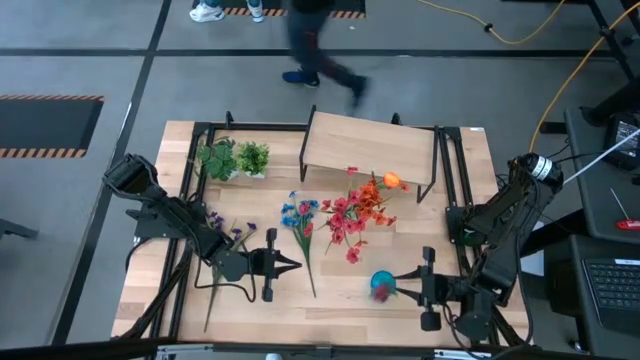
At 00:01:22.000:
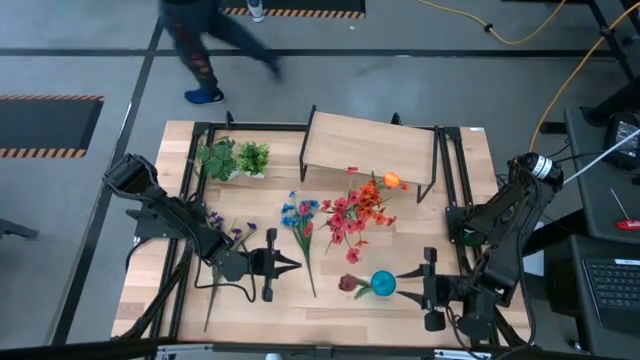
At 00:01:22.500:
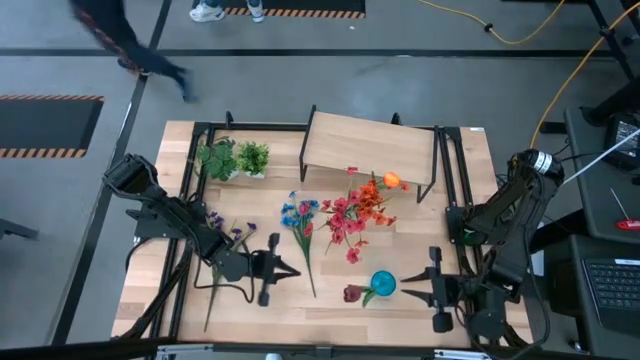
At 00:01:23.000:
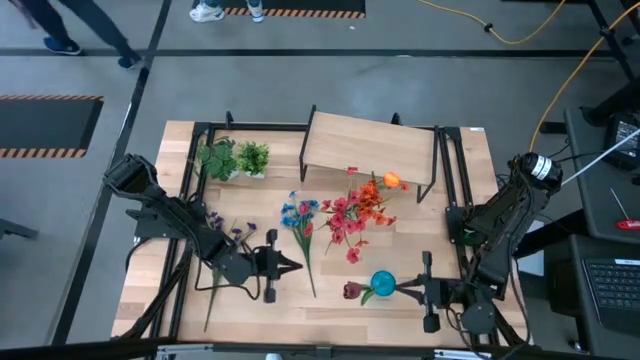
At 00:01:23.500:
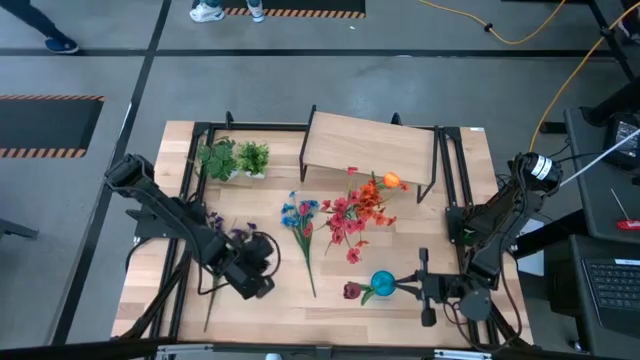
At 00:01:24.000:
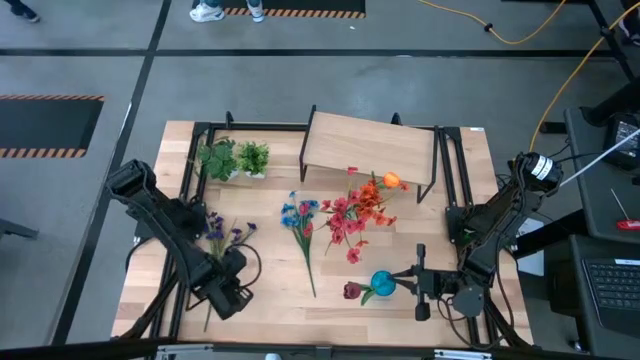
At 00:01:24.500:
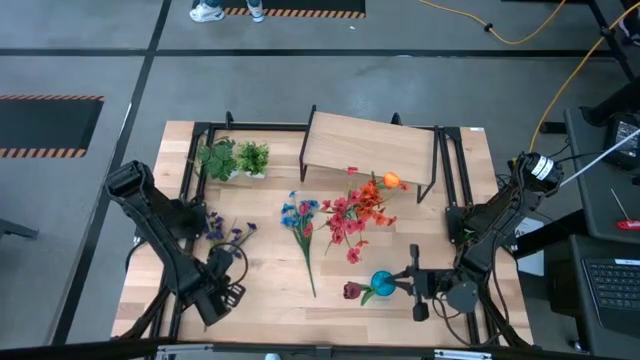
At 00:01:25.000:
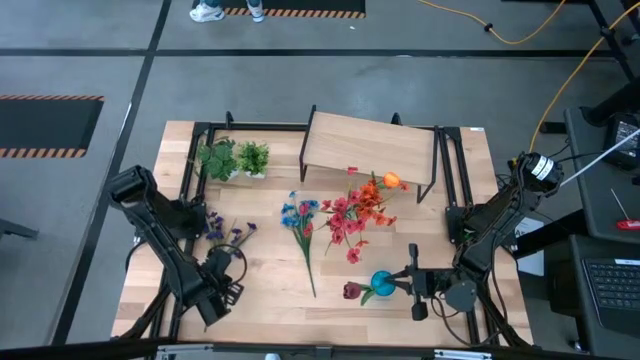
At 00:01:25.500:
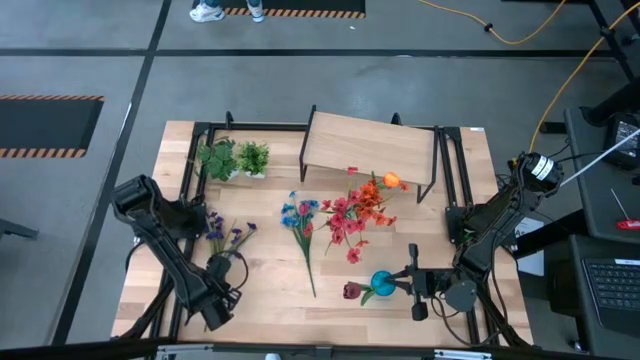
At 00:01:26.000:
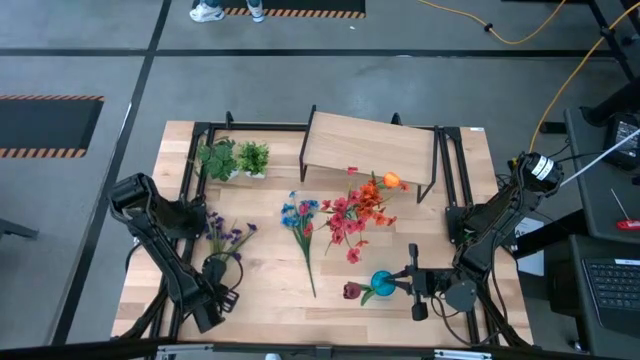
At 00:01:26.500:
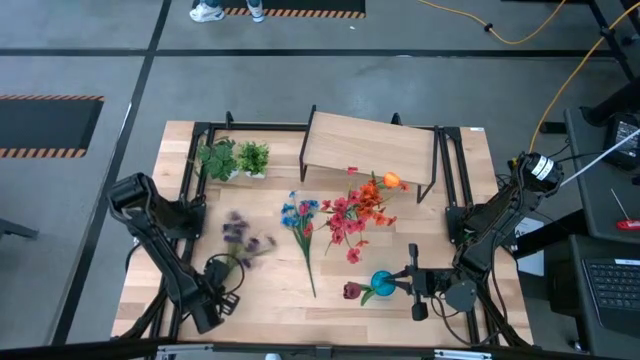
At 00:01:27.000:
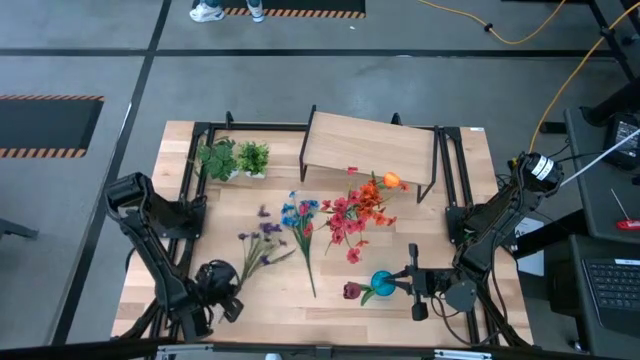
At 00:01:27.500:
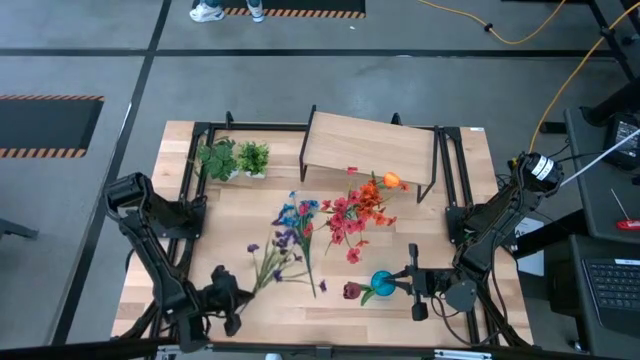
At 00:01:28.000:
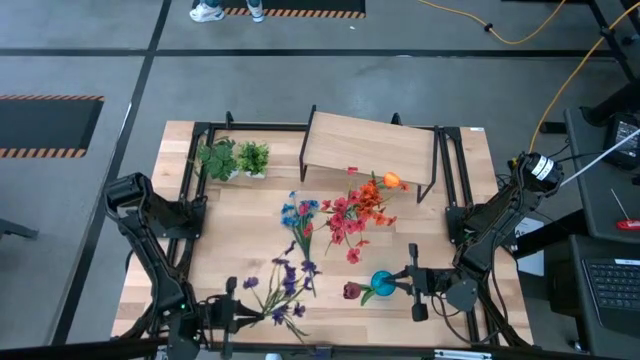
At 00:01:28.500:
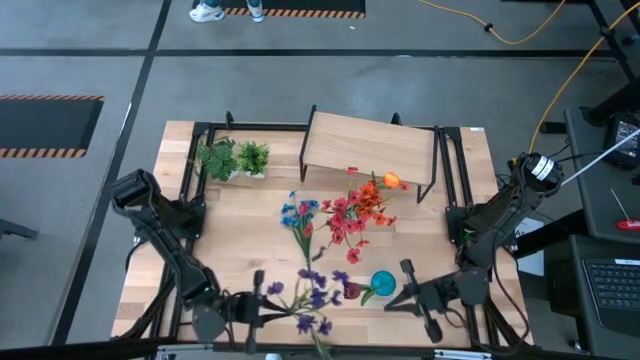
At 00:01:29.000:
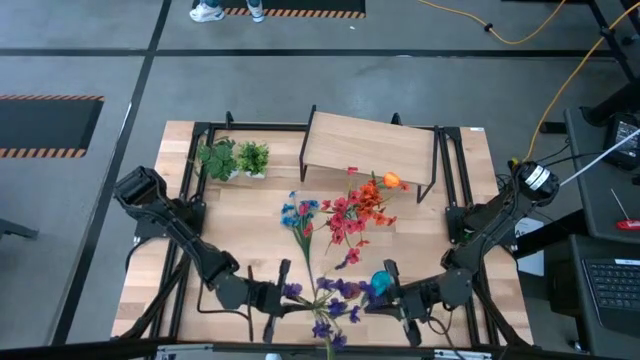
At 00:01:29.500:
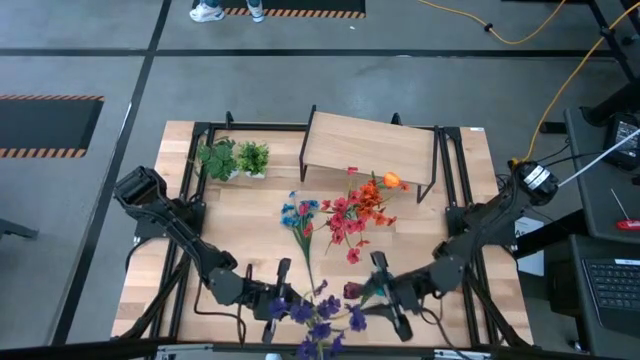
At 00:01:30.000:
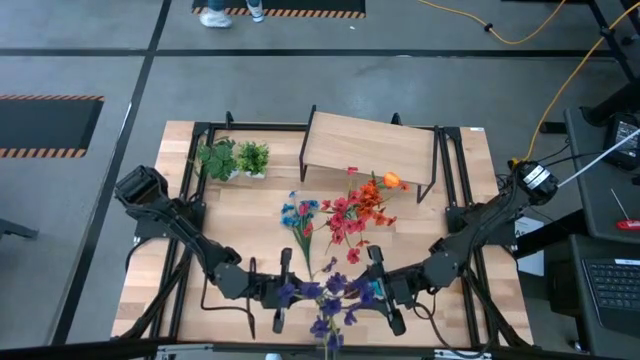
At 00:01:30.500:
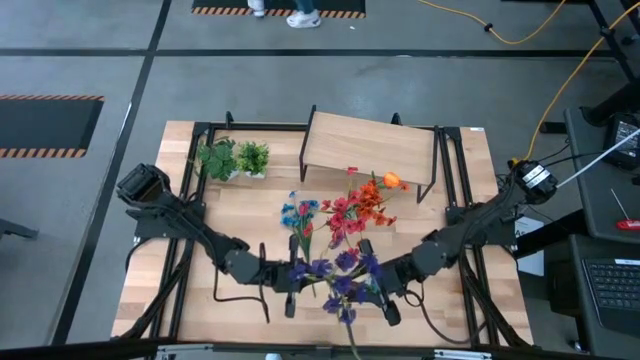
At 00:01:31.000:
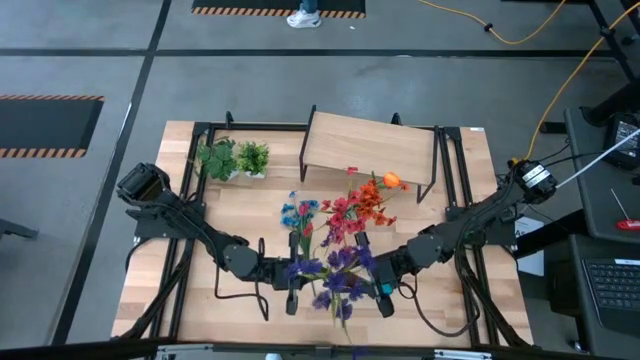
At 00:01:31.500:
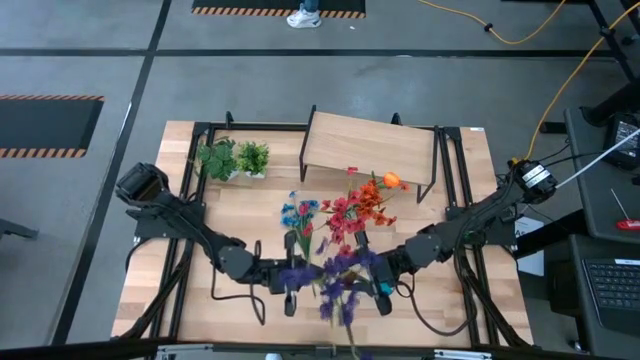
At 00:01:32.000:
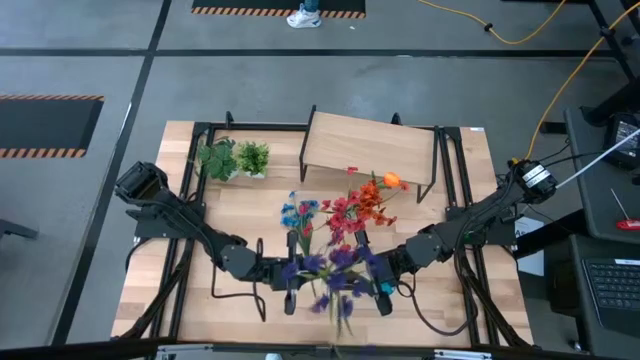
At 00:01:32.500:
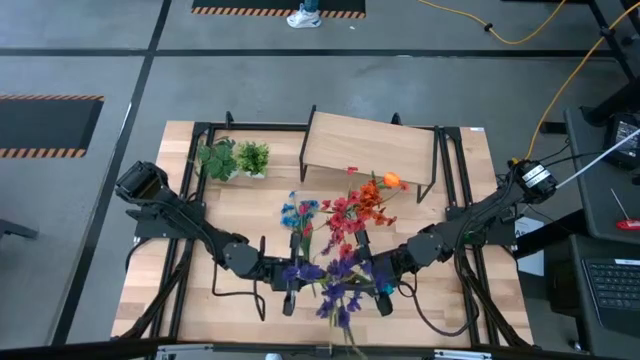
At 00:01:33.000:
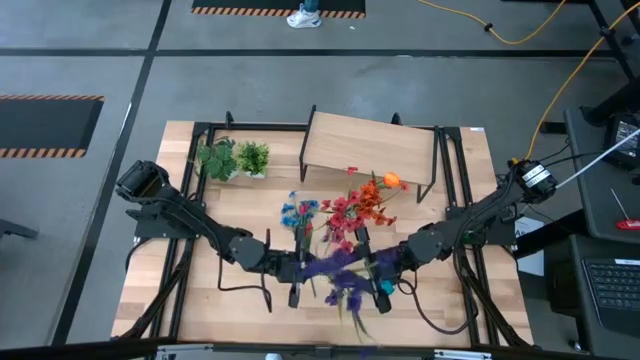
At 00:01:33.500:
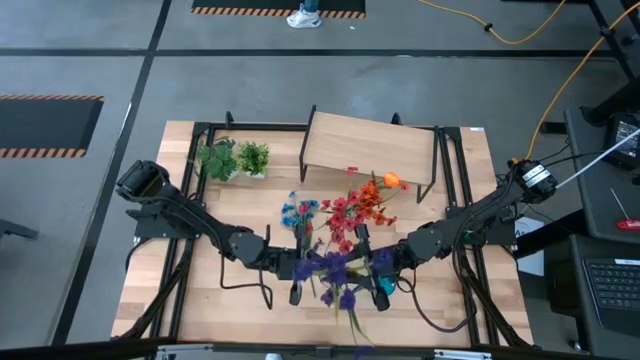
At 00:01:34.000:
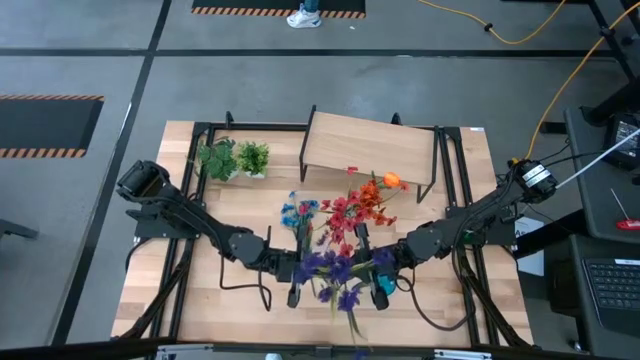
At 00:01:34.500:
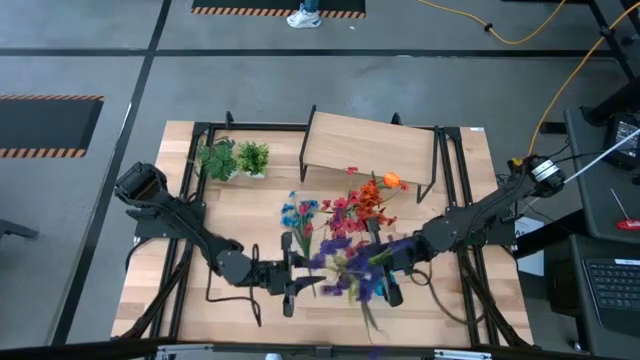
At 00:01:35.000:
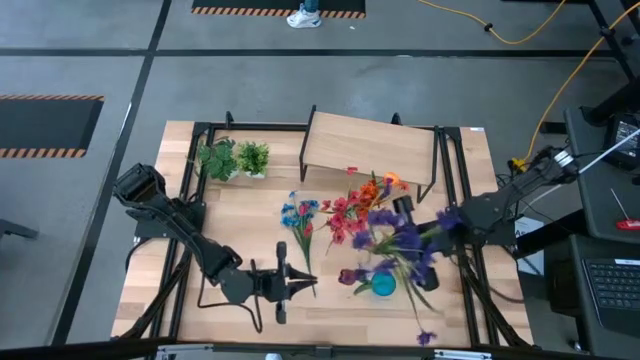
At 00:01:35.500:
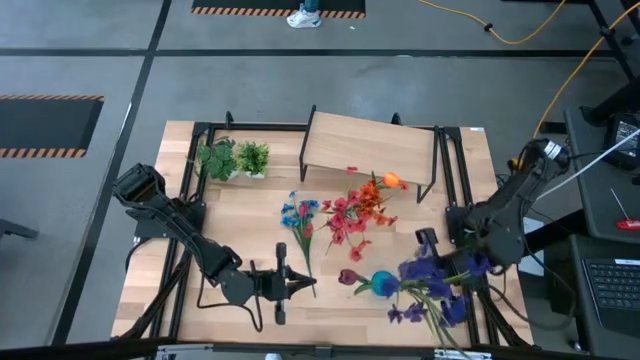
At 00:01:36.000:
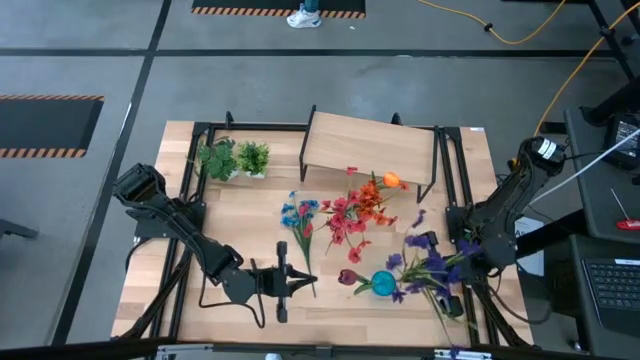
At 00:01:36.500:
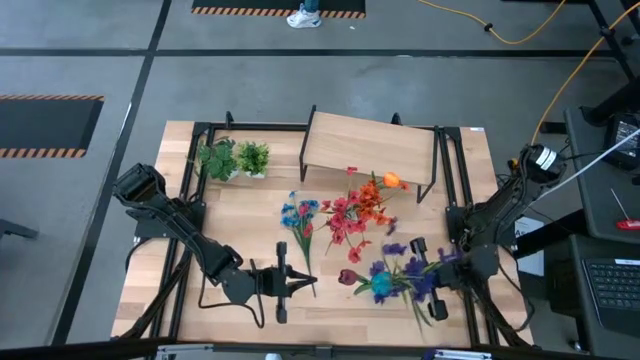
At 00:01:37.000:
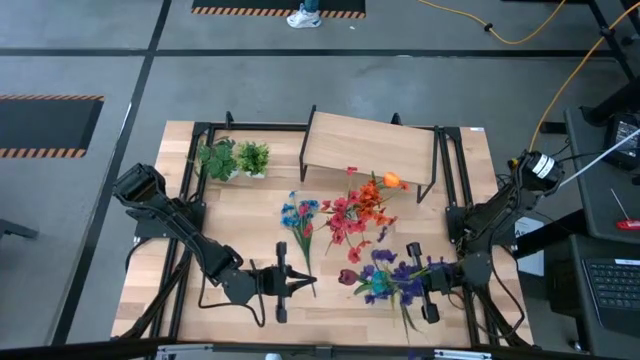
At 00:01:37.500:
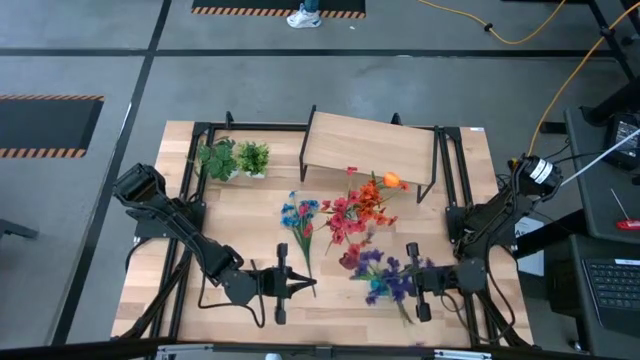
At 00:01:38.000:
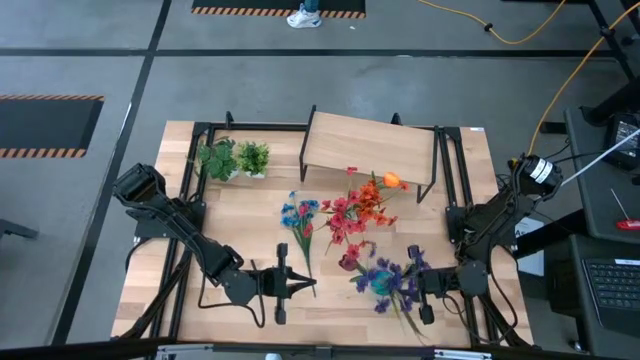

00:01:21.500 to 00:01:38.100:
Task: Pick and place flowers into a vace then onto a shelf
Put the violet flowers into the blue vase
